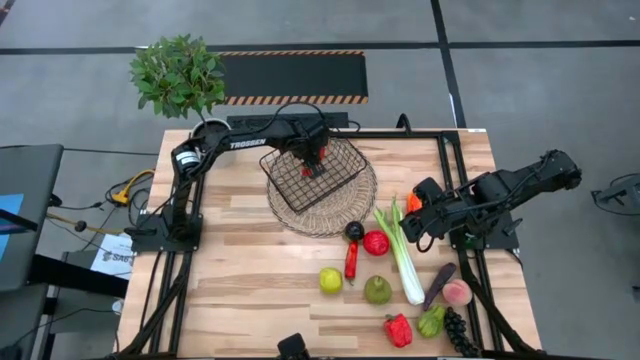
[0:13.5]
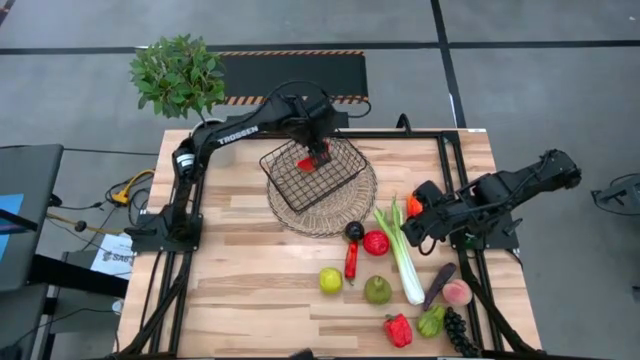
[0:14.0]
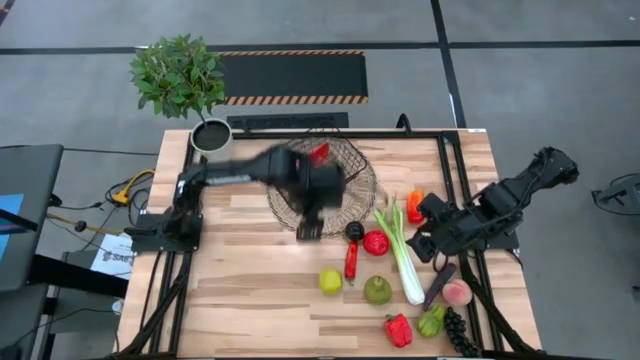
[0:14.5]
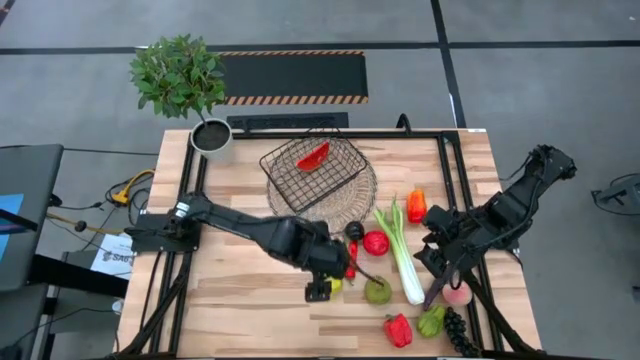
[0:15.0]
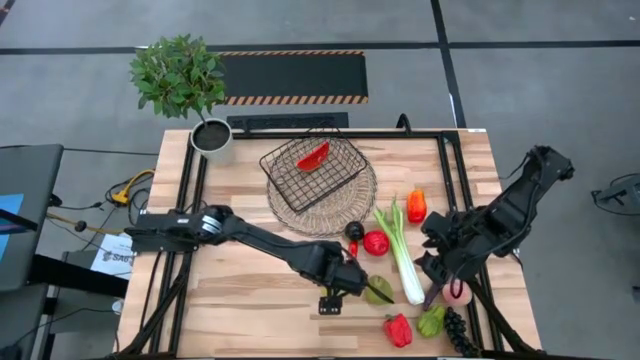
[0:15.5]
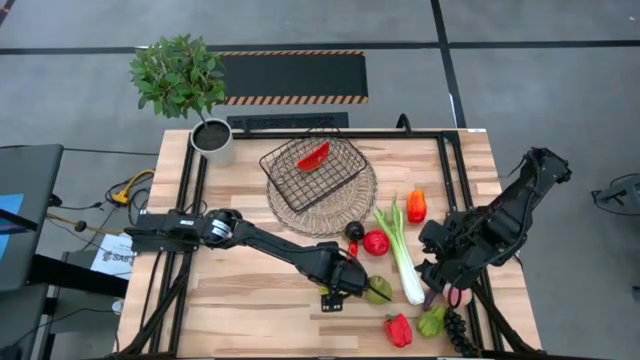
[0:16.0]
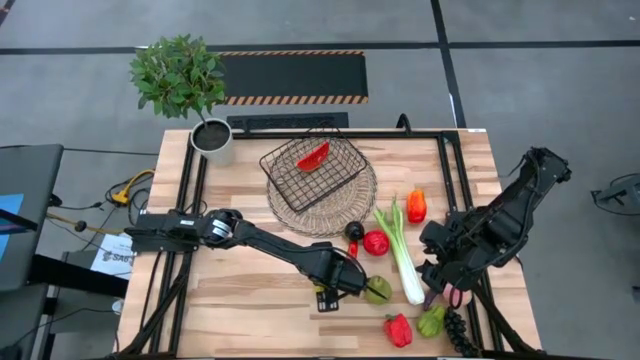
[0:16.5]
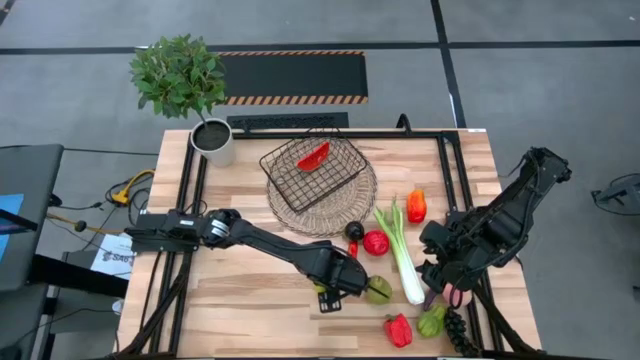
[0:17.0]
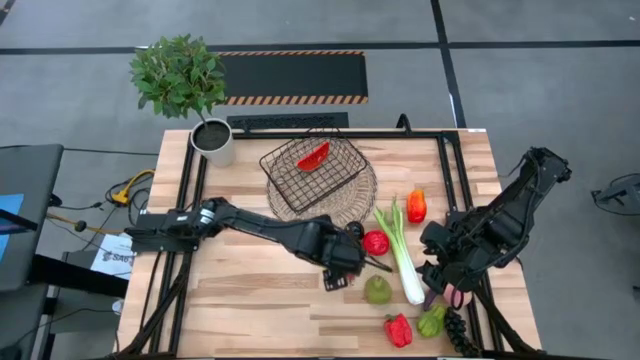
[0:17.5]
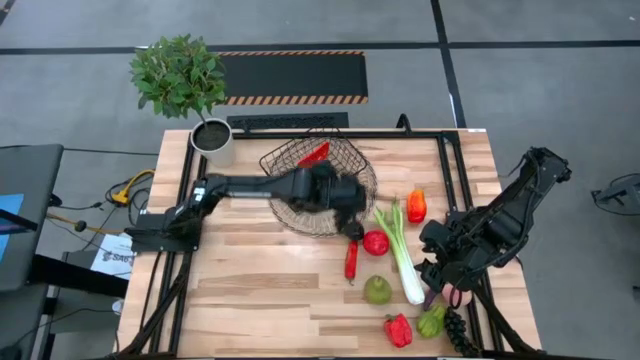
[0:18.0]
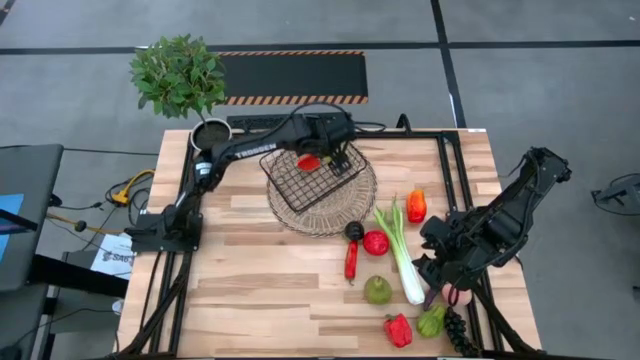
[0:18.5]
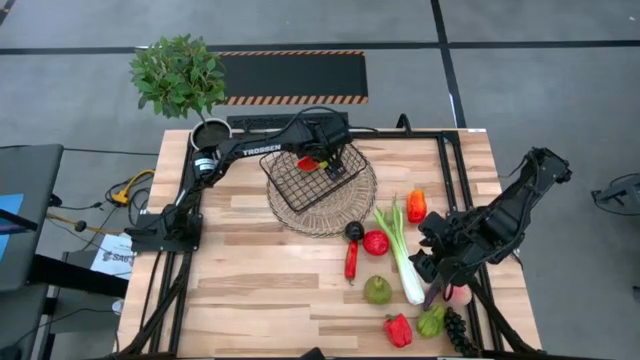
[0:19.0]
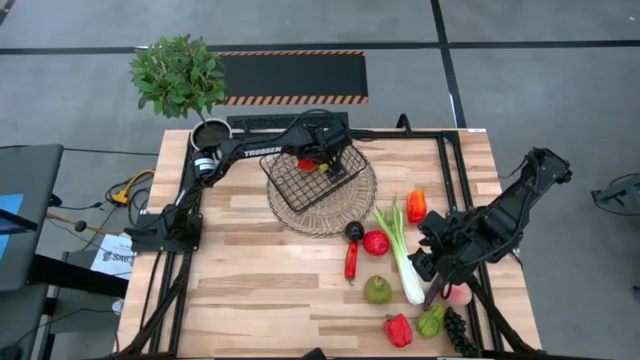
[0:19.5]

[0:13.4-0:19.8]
Task: Build produce basket
Put the green apple into the wire basket

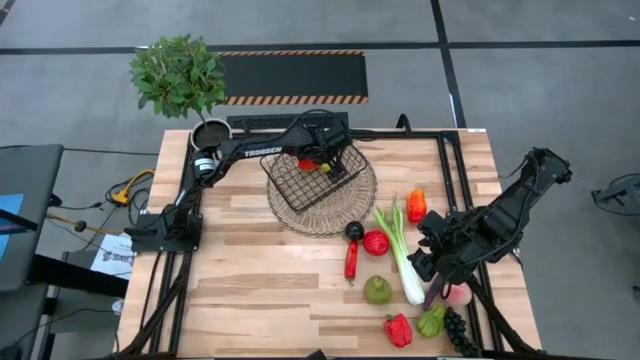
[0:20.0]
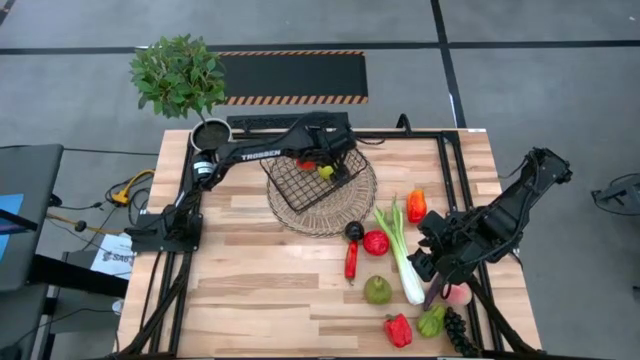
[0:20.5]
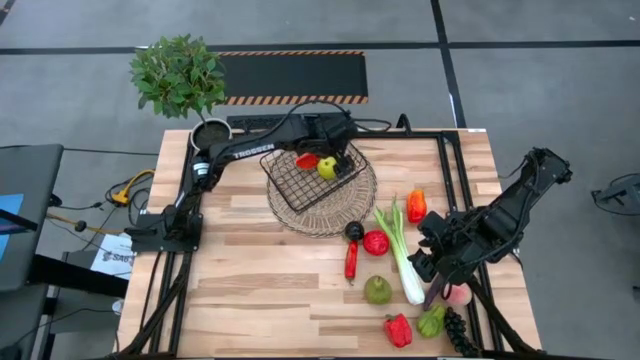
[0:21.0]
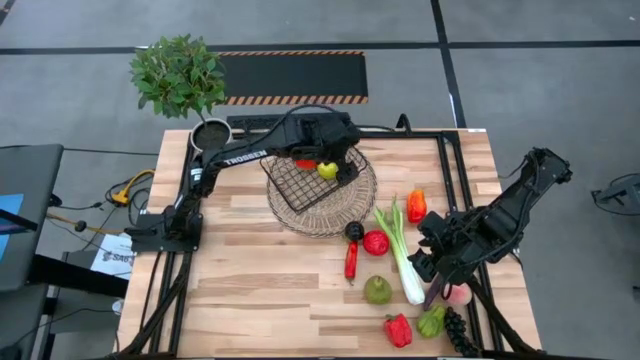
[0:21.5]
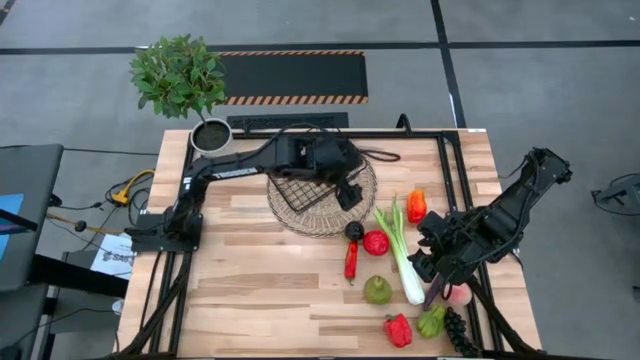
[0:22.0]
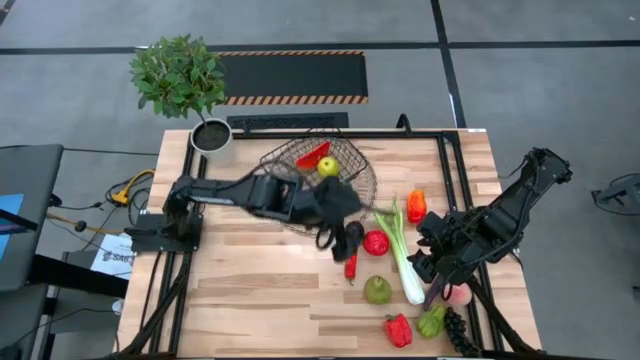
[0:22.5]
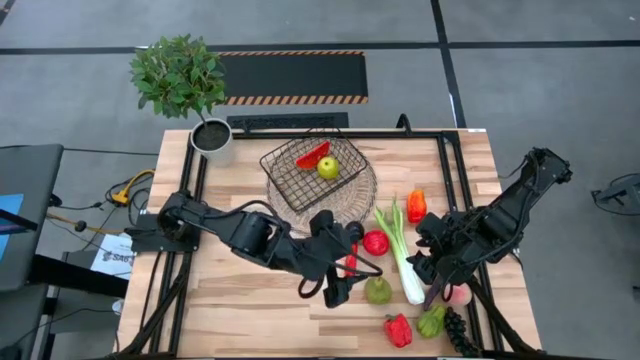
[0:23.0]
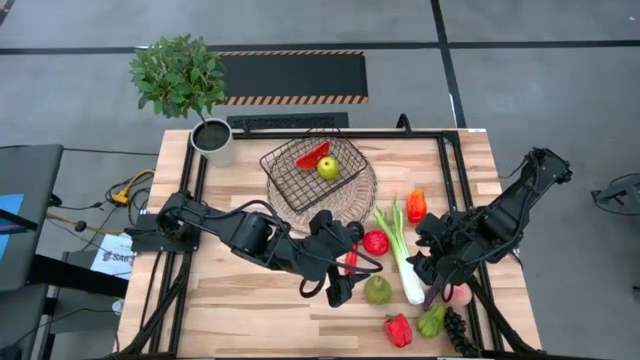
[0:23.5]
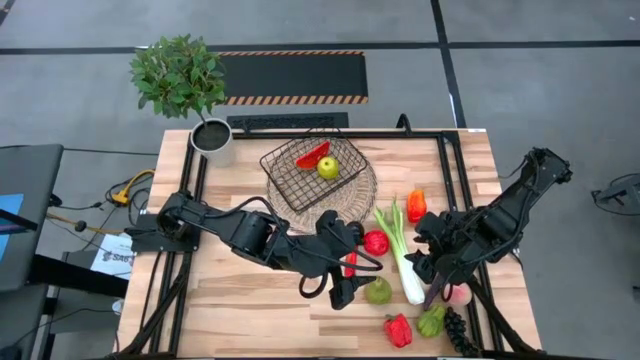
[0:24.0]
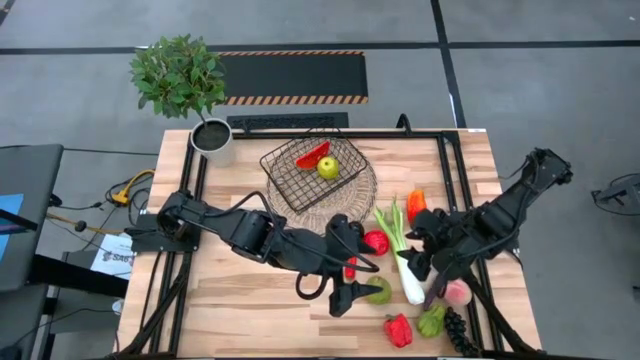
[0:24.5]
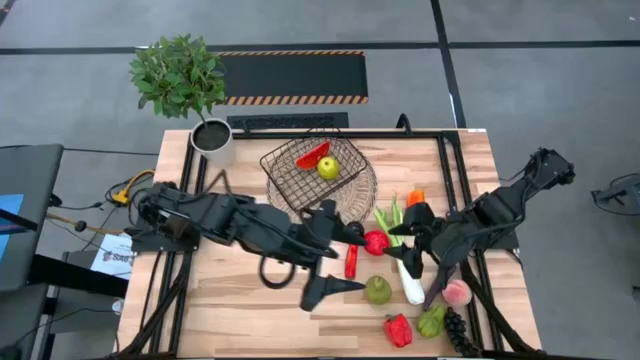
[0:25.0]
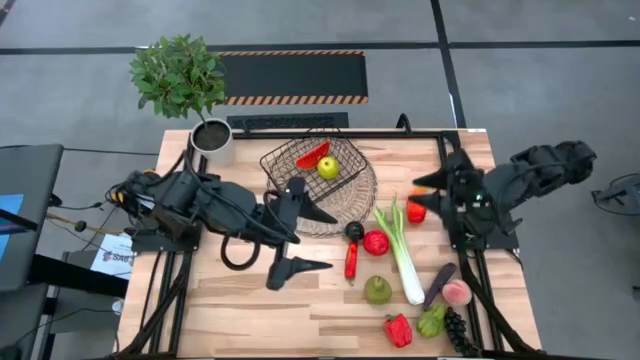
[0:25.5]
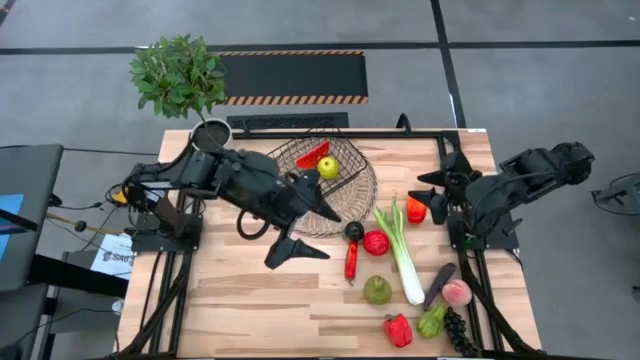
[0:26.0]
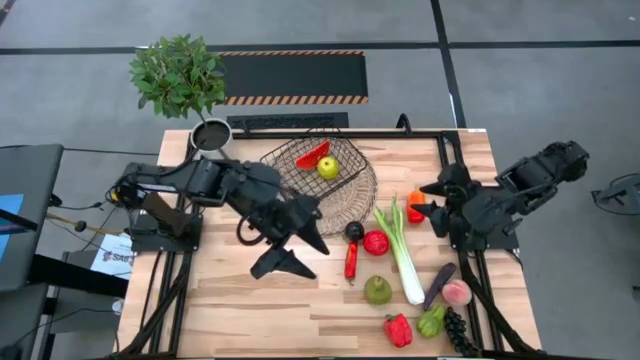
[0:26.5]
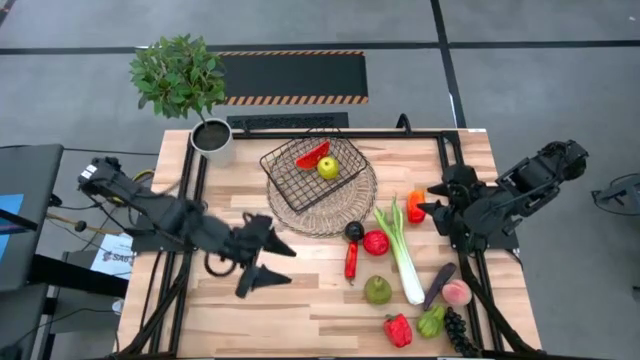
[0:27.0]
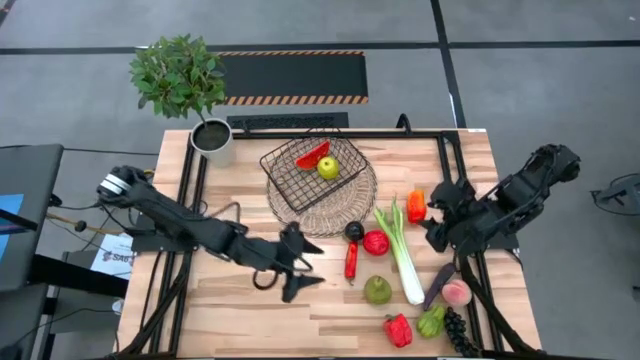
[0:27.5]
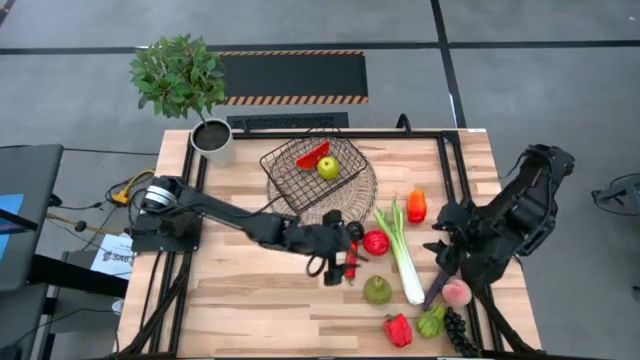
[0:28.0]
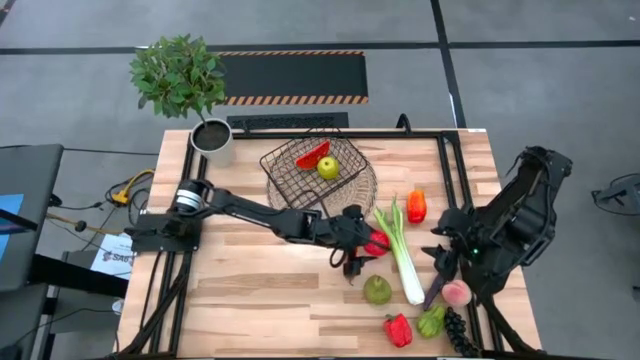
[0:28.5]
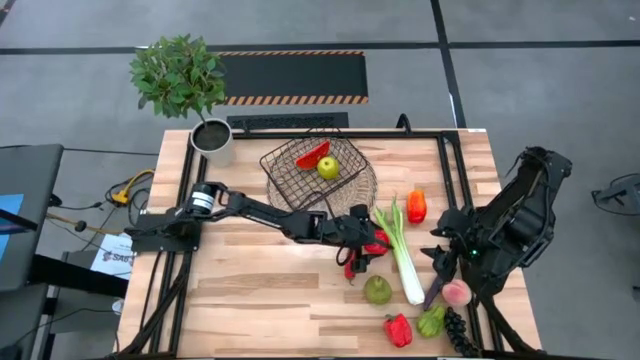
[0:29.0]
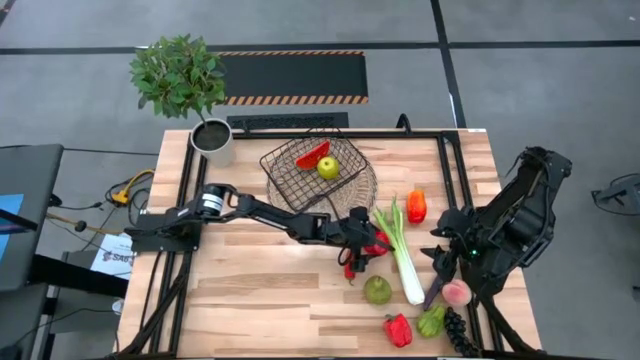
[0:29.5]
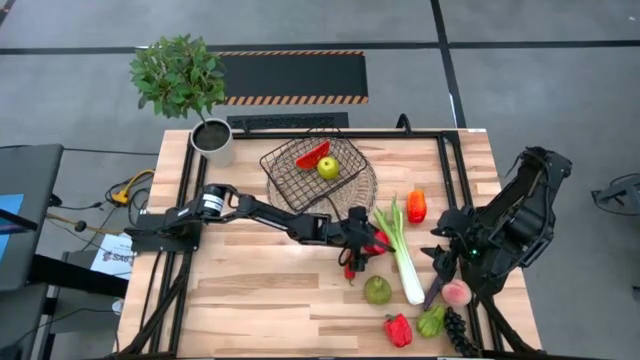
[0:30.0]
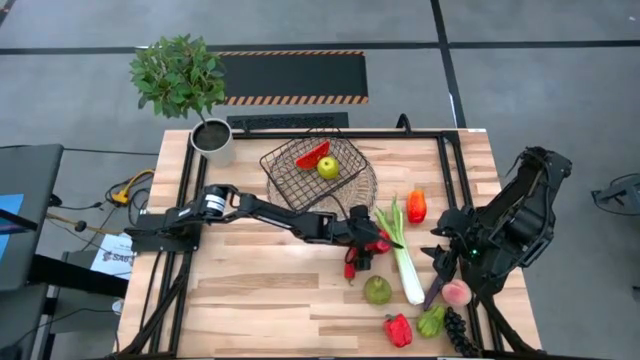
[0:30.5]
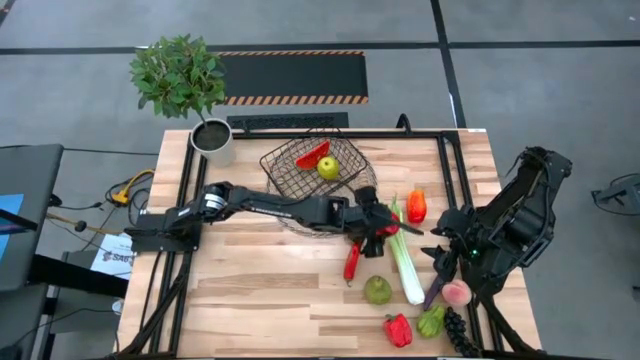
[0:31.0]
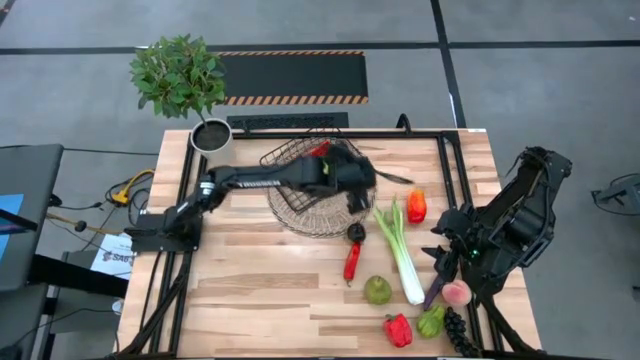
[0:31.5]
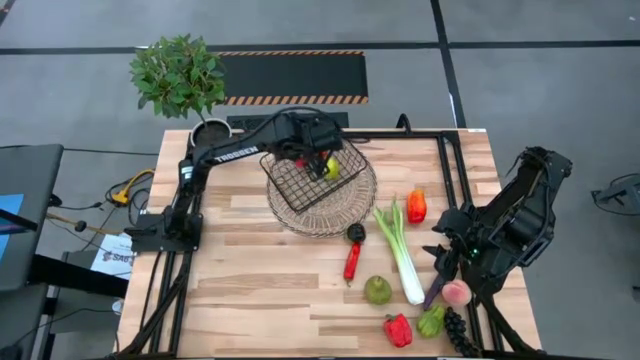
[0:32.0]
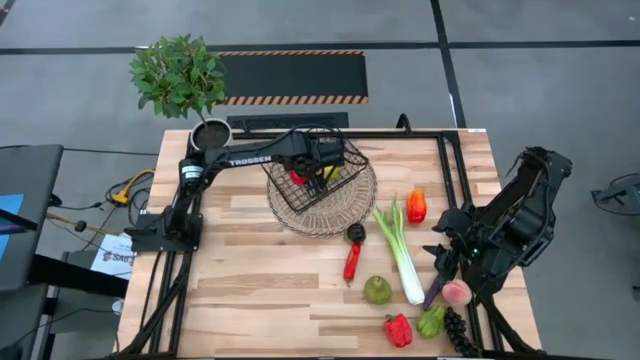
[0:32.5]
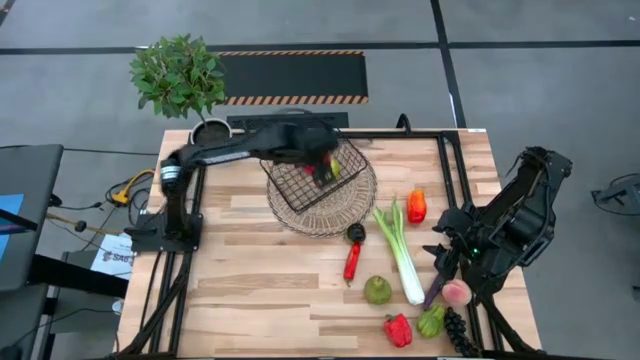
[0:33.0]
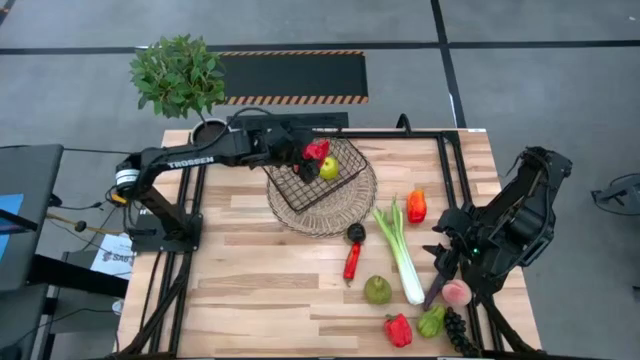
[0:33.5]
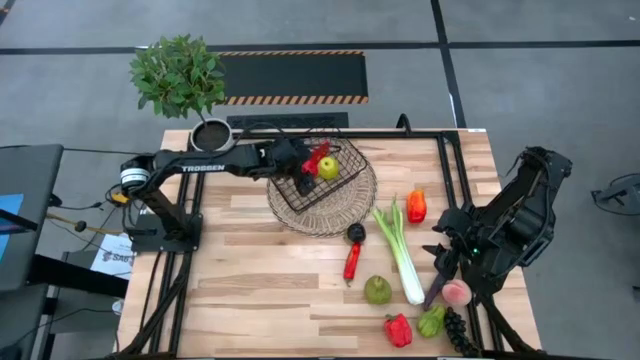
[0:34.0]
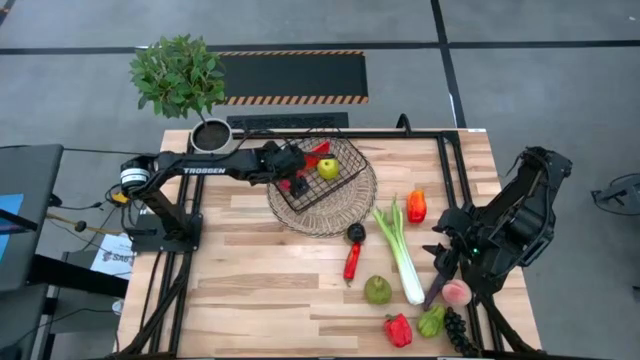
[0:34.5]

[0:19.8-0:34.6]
Put the red apple into the wire basket
